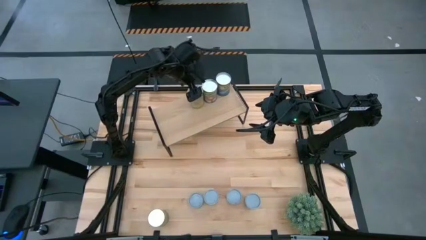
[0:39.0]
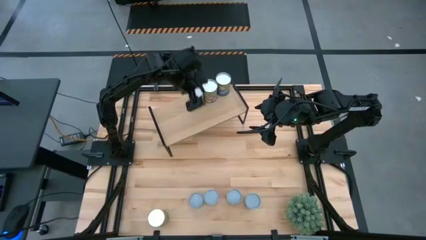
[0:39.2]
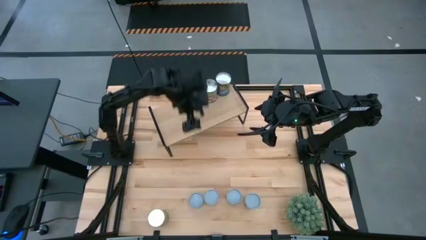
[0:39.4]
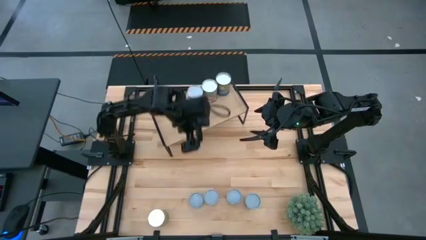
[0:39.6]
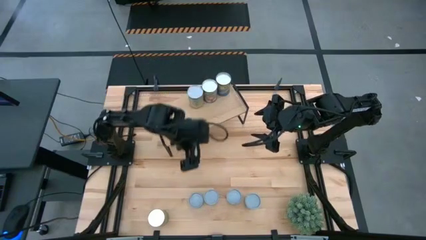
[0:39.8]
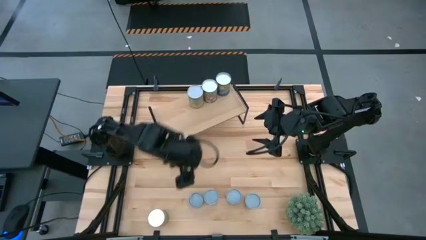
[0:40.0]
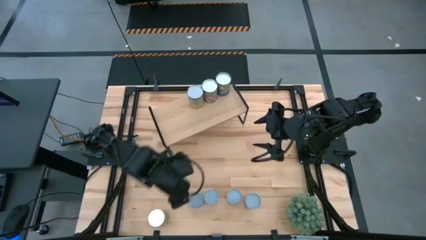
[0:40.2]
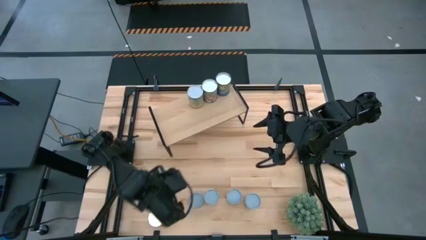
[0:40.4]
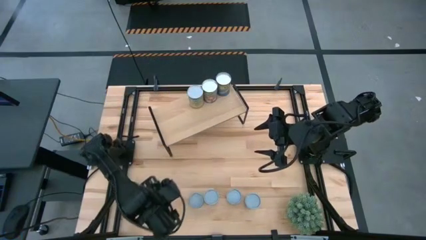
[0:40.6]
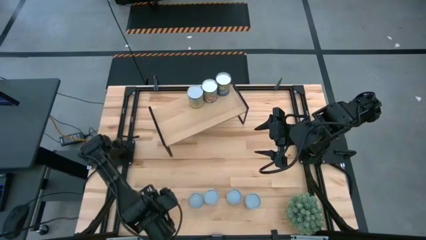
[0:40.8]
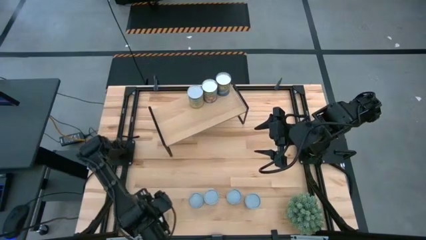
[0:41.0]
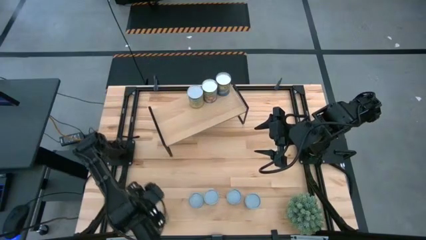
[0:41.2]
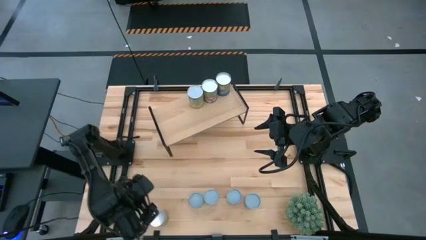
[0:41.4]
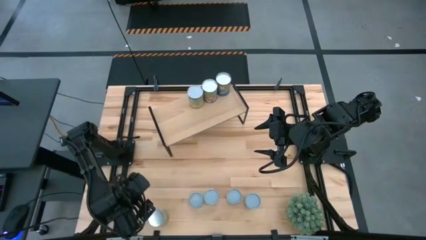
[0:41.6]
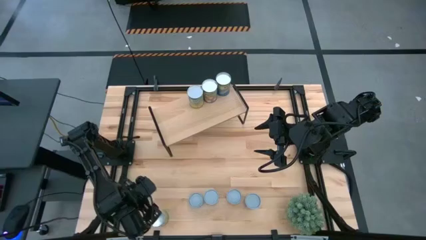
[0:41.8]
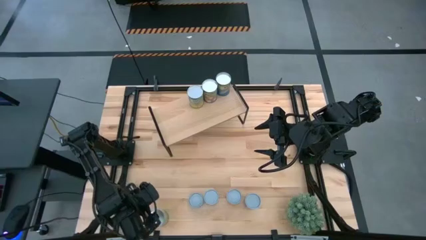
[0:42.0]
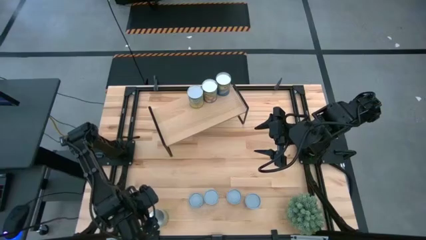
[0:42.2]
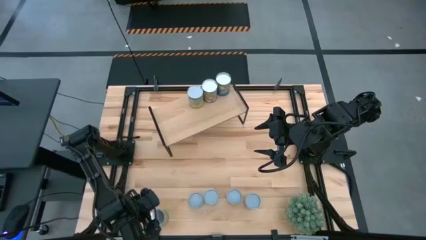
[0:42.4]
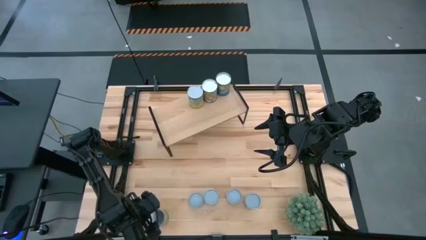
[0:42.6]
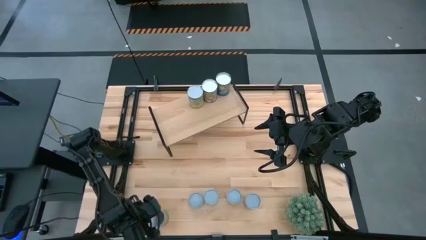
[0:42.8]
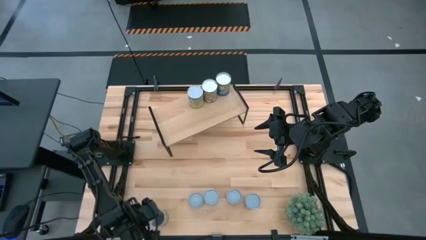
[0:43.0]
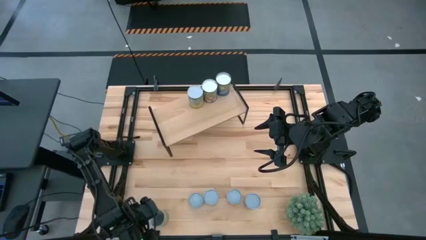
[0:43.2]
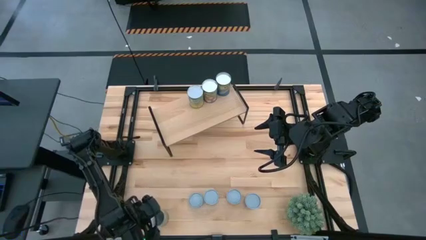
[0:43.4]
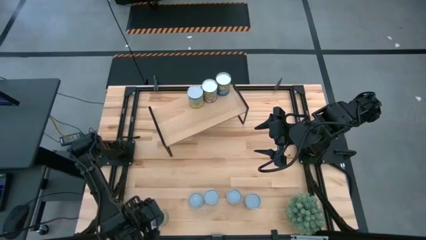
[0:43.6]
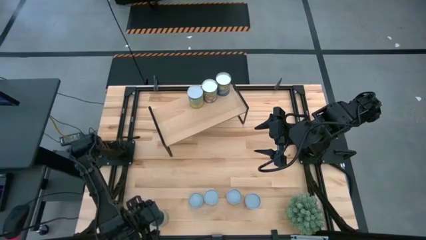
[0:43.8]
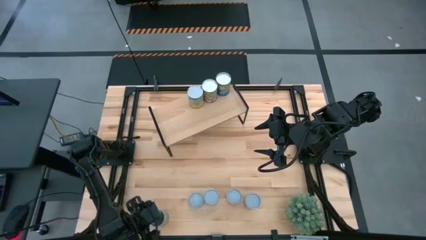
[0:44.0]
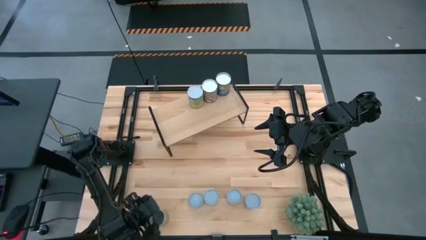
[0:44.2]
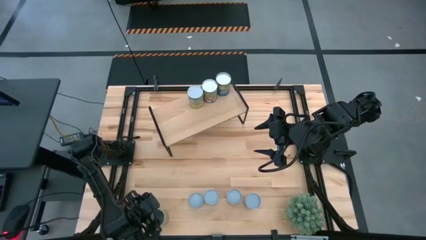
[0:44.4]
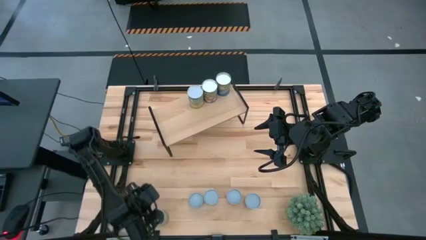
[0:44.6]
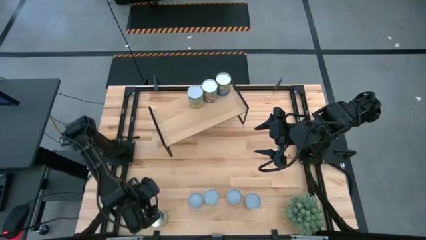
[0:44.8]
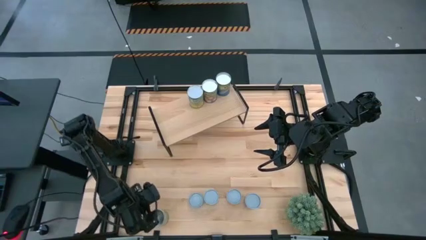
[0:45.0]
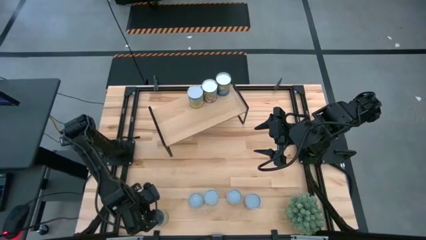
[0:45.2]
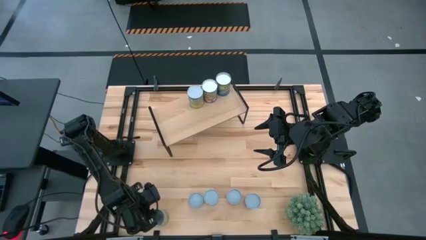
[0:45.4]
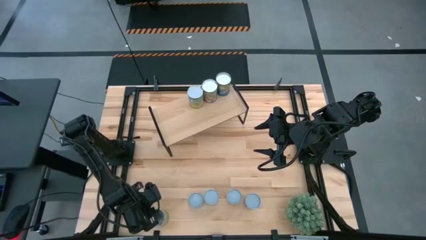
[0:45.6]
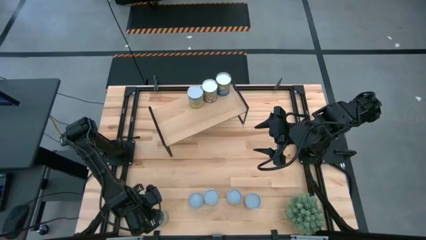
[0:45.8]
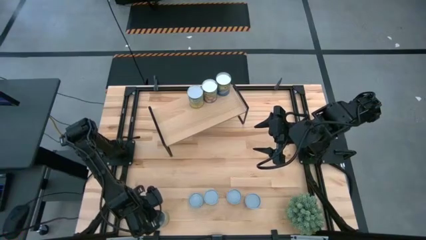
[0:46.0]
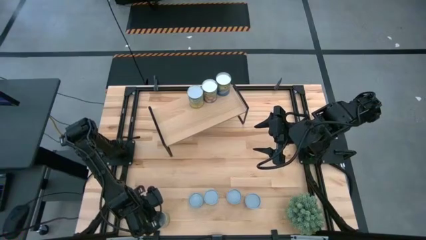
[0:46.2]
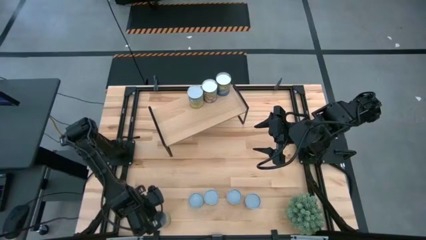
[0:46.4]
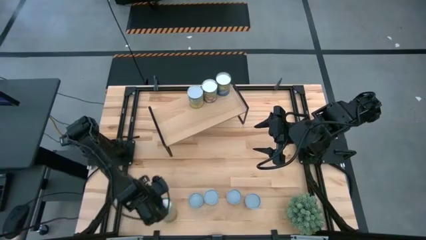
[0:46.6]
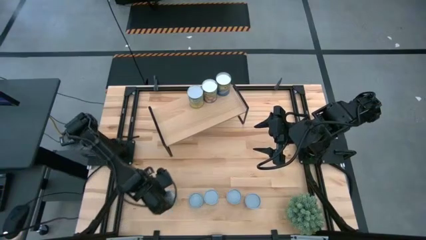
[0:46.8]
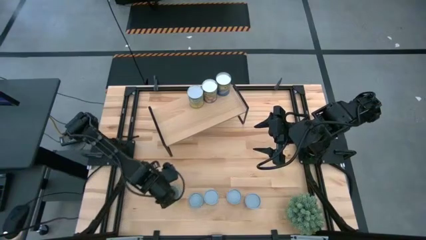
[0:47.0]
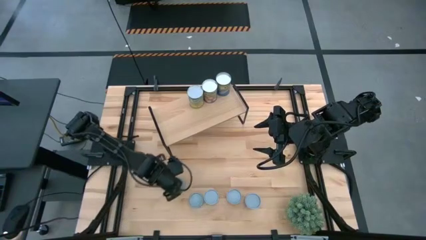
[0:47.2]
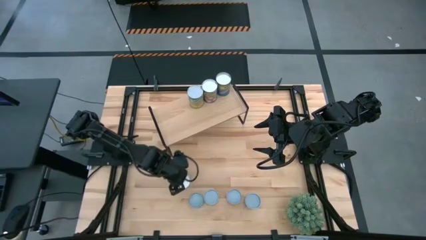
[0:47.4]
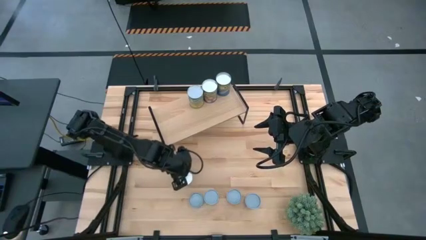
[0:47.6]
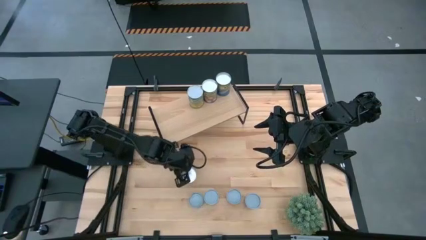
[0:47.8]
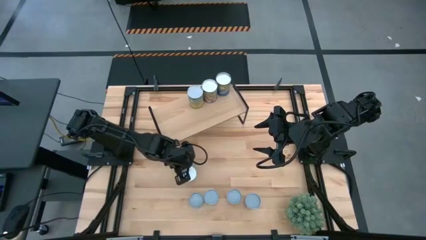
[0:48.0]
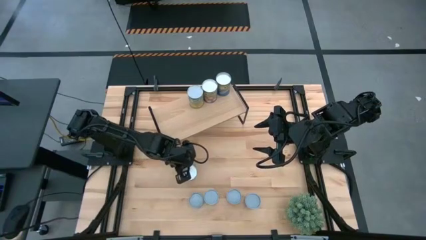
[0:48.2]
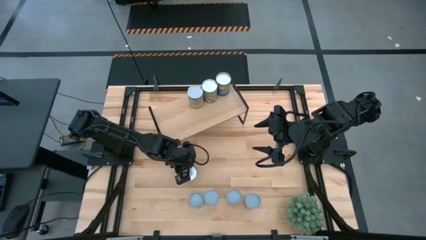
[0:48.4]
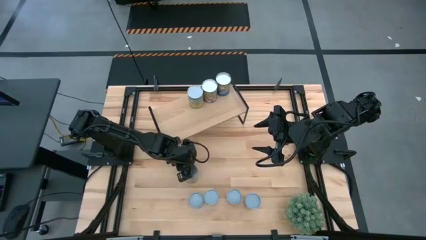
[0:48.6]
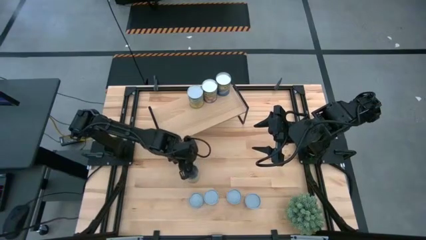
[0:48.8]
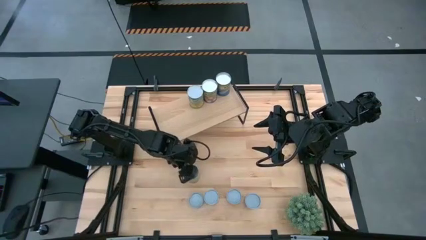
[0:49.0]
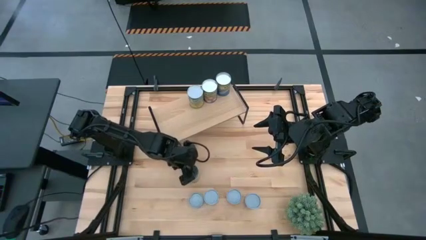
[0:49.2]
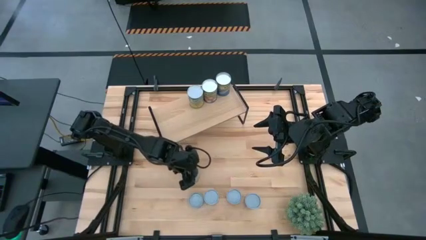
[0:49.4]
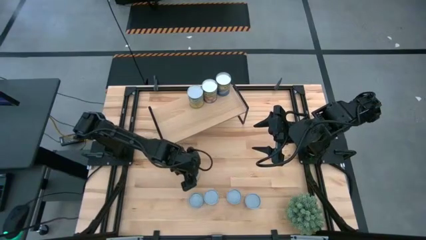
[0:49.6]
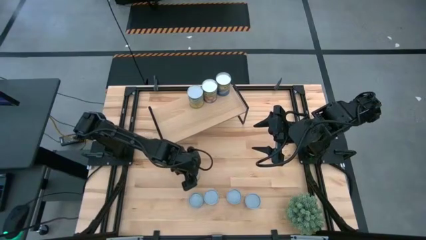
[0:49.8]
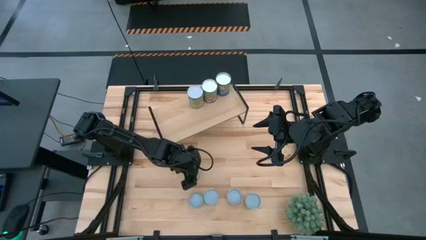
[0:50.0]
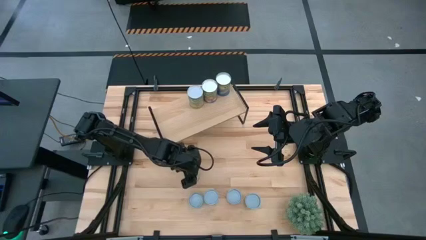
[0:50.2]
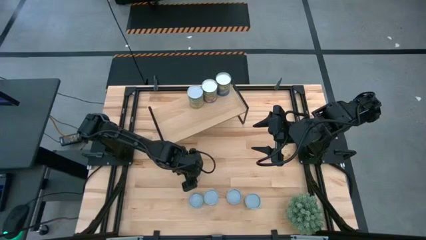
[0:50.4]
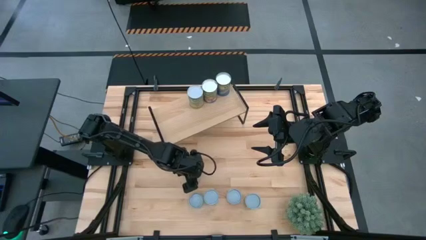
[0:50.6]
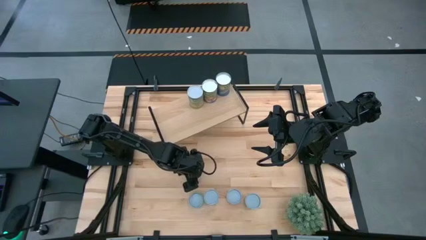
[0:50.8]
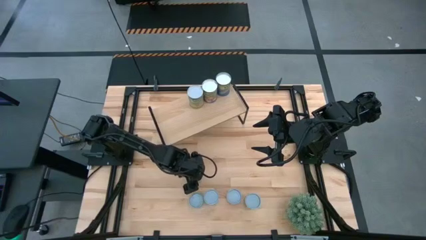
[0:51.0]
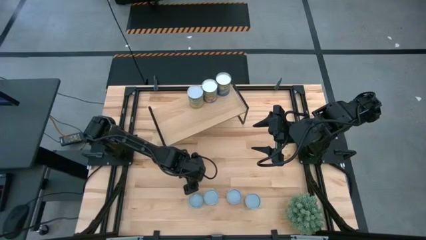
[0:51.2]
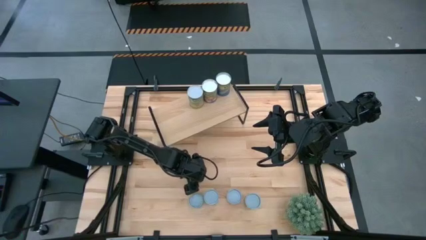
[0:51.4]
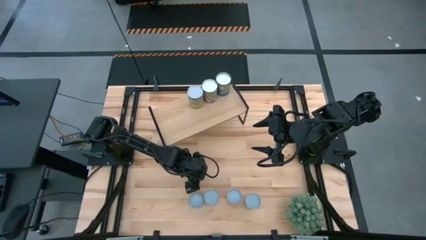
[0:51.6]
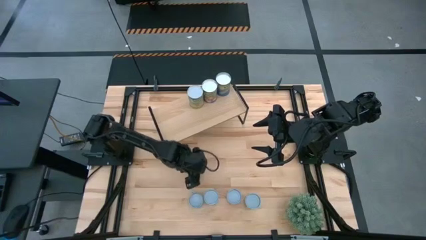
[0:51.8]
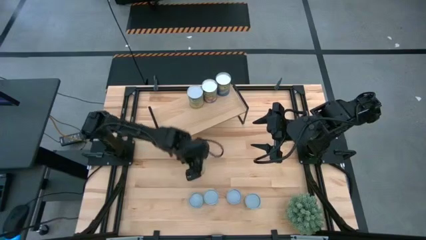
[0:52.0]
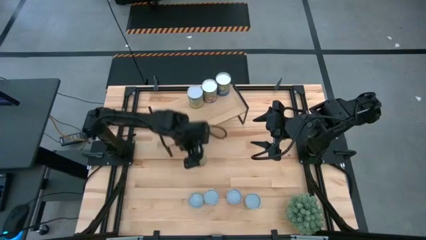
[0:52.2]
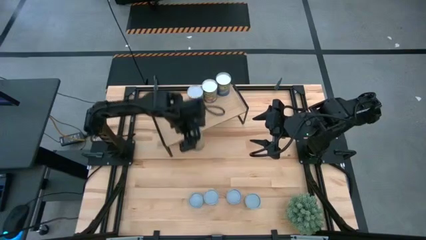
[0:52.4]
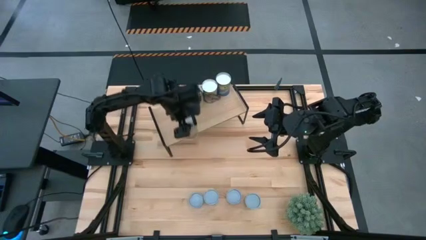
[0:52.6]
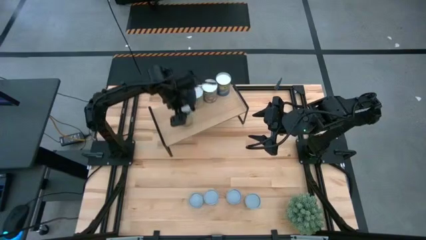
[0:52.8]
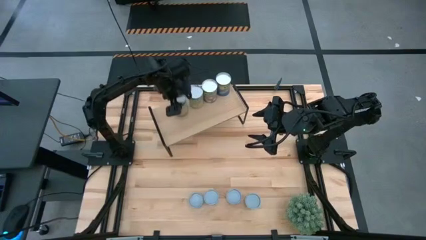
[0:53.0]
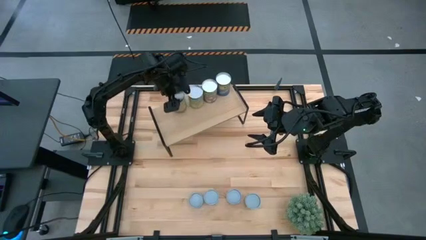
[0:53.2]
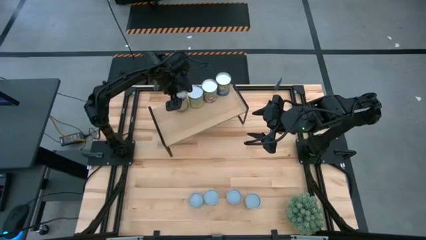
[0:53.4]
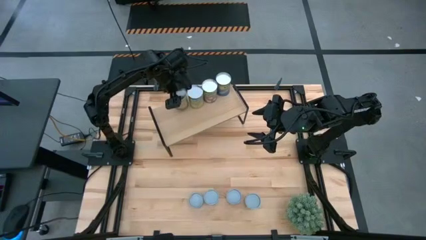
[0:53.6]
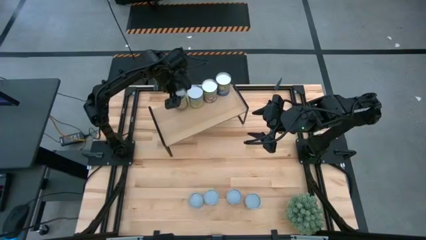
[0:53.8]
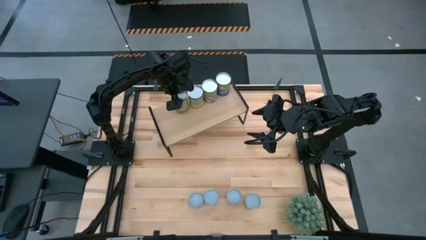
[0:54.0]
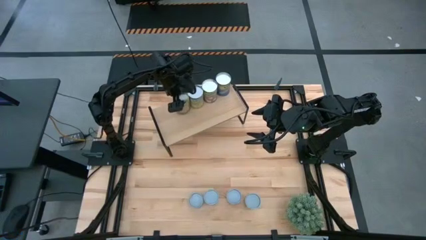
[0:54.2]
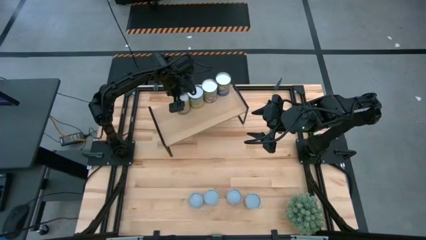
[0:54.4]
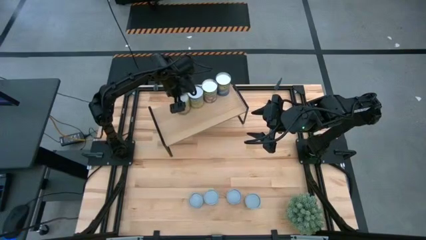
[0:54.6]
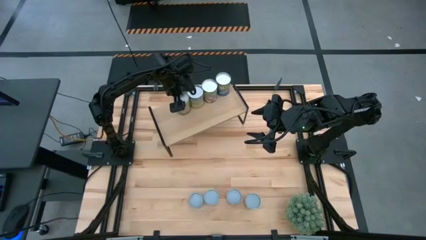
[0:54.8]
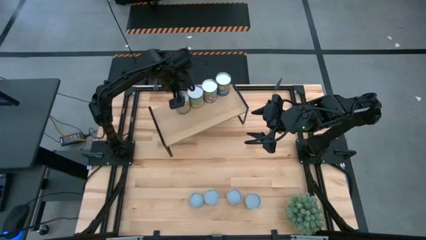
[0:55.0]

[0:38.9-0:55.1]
Task: Pick and place cans onto a shelf
Put the canned orange on the shelf
